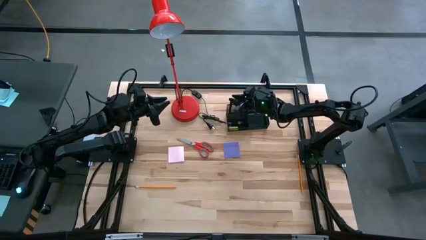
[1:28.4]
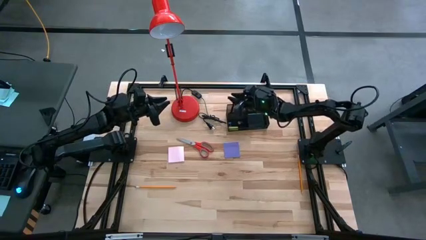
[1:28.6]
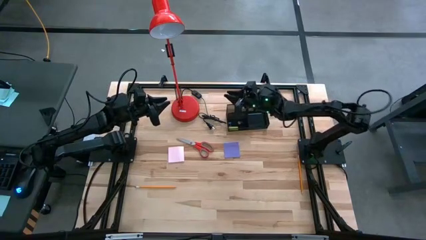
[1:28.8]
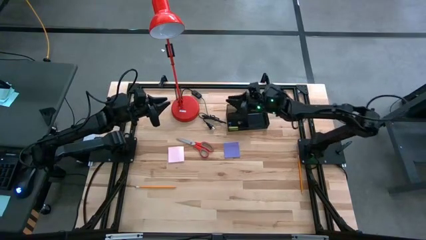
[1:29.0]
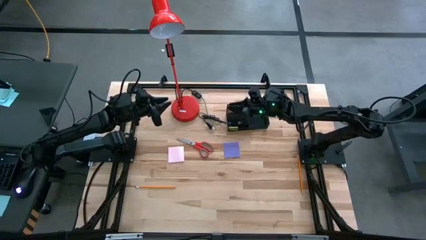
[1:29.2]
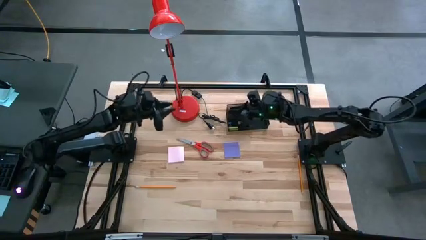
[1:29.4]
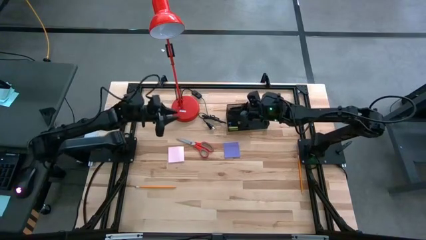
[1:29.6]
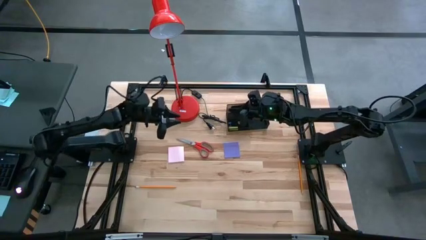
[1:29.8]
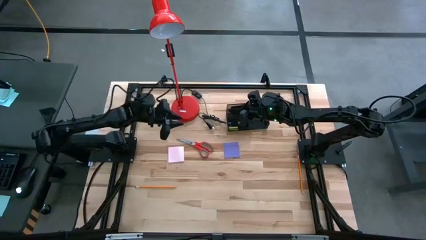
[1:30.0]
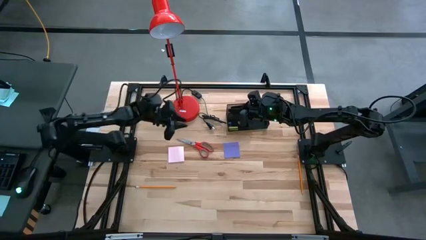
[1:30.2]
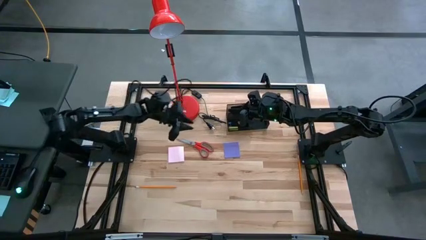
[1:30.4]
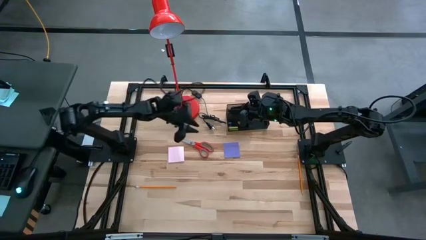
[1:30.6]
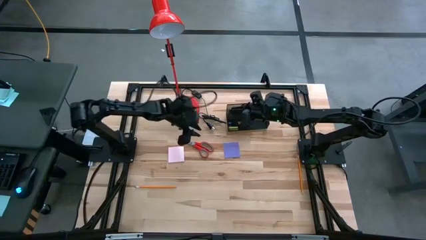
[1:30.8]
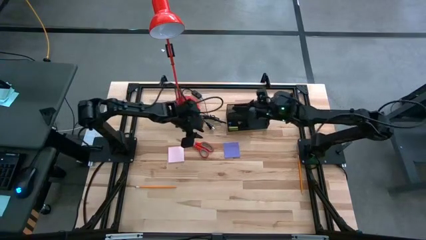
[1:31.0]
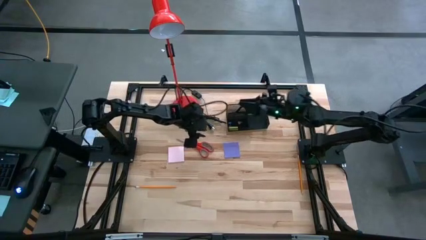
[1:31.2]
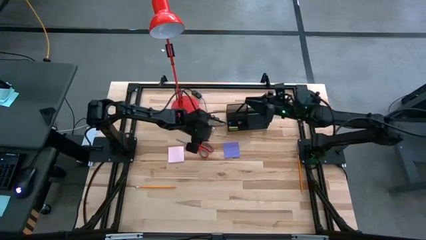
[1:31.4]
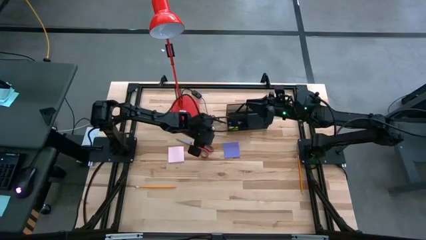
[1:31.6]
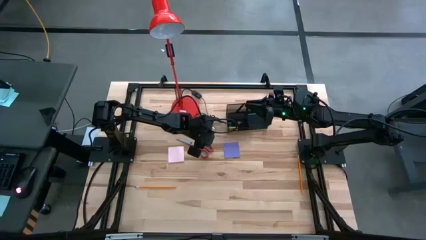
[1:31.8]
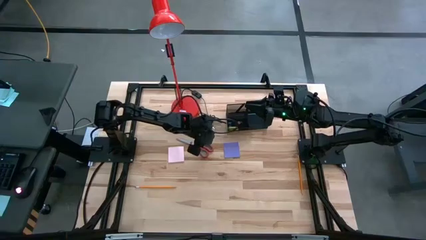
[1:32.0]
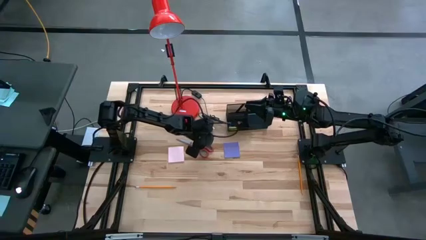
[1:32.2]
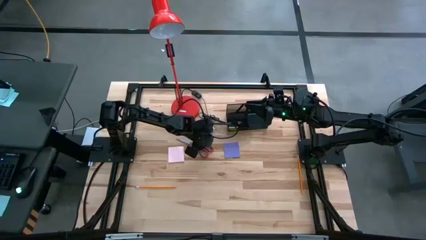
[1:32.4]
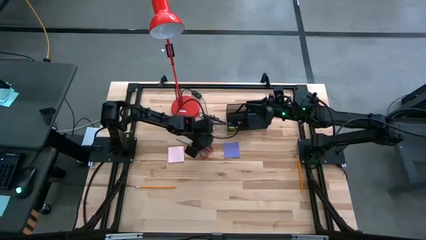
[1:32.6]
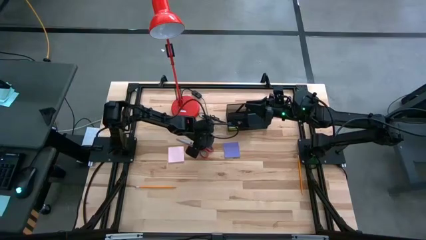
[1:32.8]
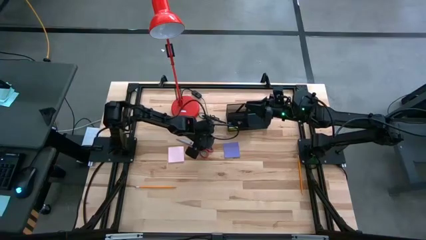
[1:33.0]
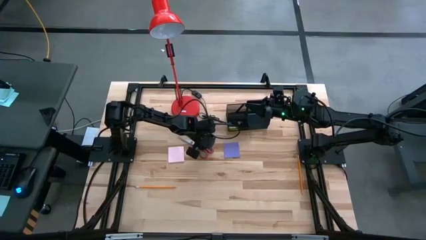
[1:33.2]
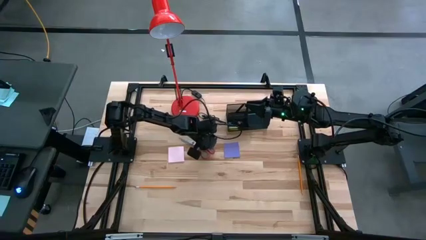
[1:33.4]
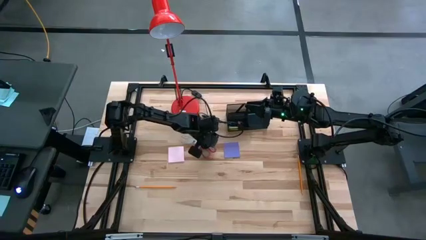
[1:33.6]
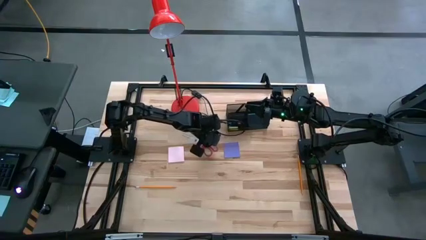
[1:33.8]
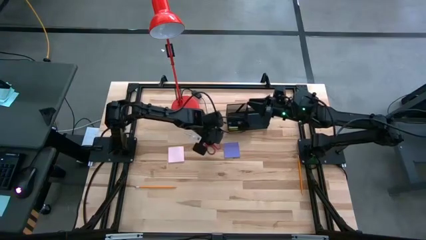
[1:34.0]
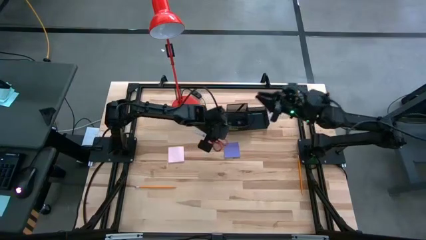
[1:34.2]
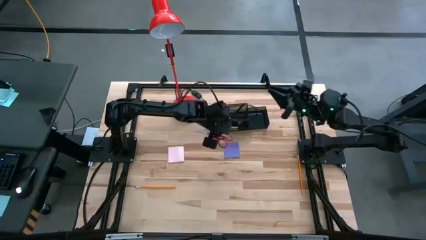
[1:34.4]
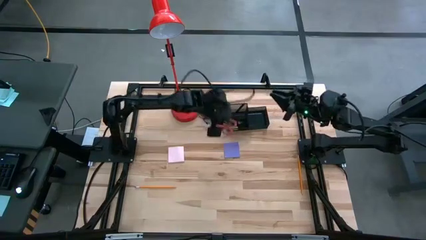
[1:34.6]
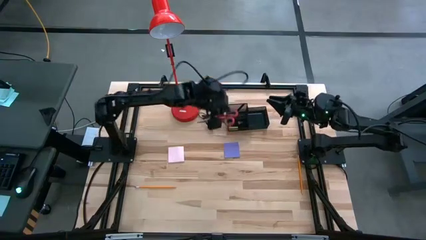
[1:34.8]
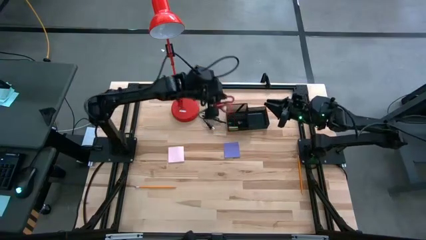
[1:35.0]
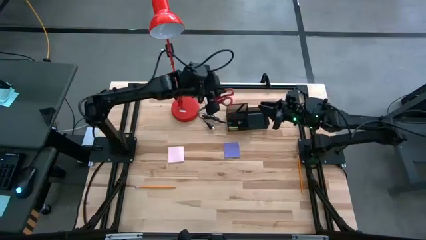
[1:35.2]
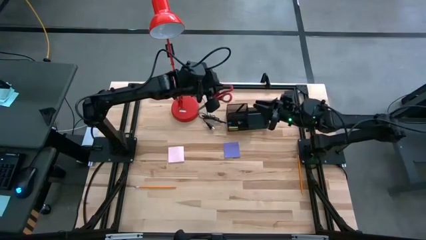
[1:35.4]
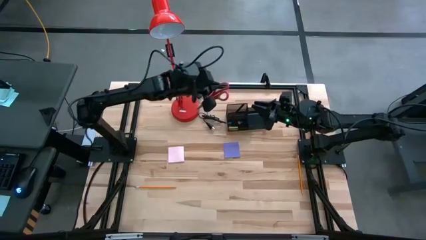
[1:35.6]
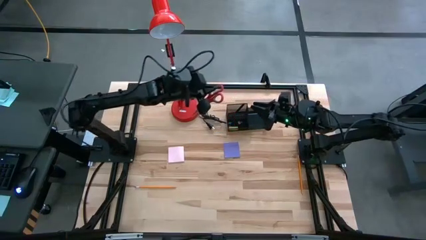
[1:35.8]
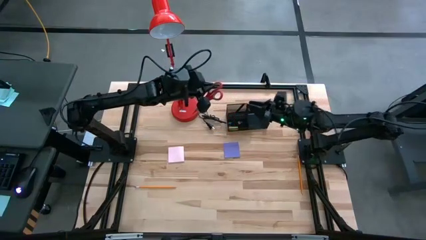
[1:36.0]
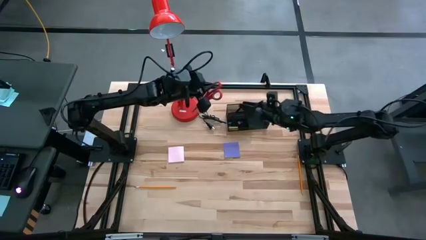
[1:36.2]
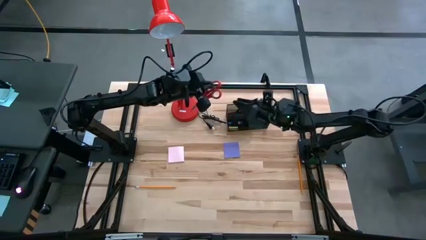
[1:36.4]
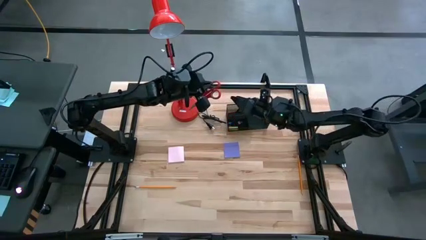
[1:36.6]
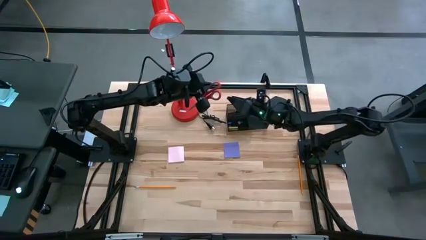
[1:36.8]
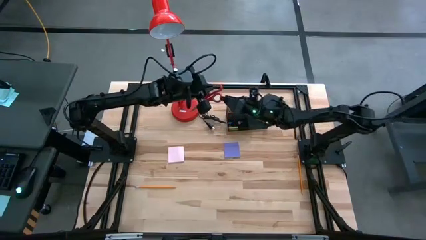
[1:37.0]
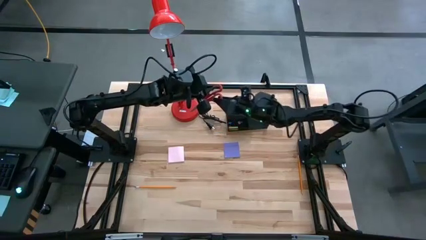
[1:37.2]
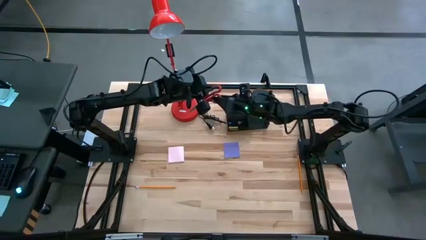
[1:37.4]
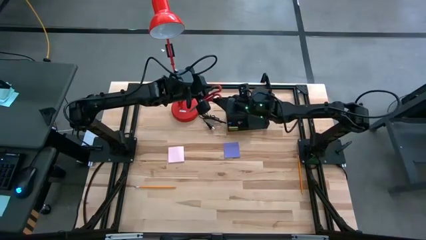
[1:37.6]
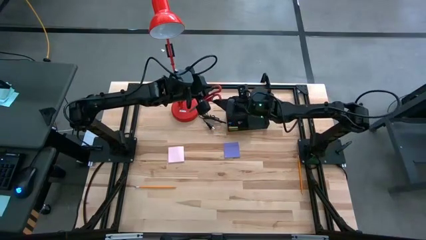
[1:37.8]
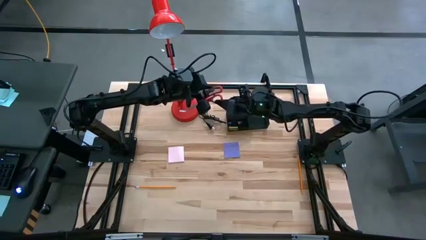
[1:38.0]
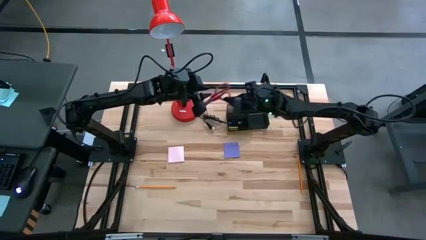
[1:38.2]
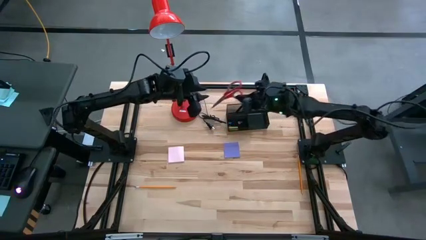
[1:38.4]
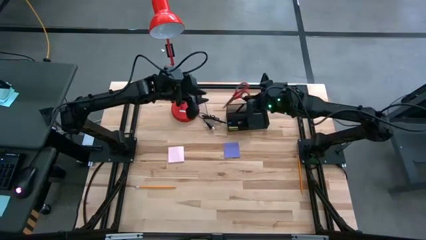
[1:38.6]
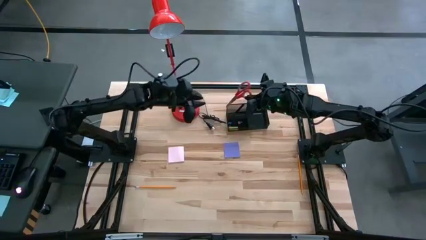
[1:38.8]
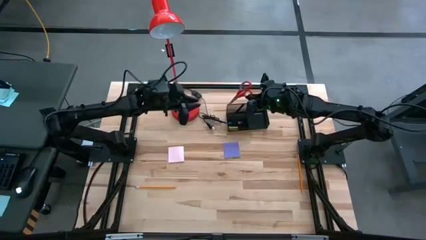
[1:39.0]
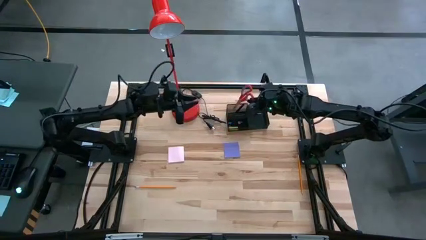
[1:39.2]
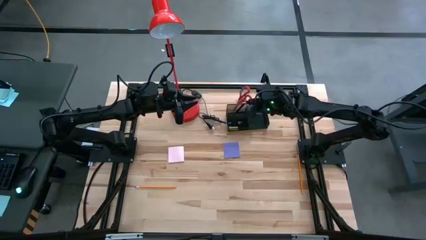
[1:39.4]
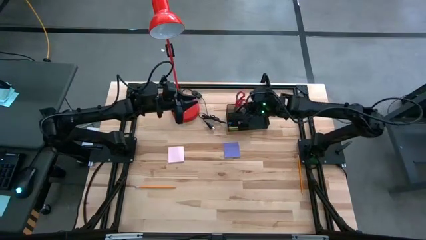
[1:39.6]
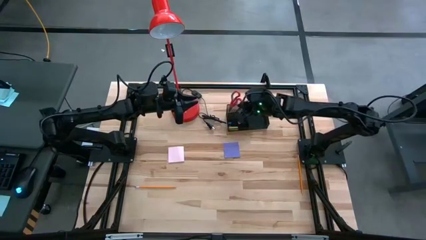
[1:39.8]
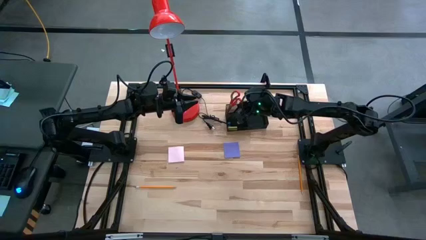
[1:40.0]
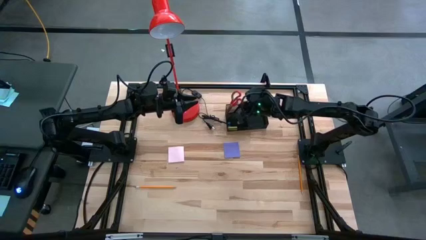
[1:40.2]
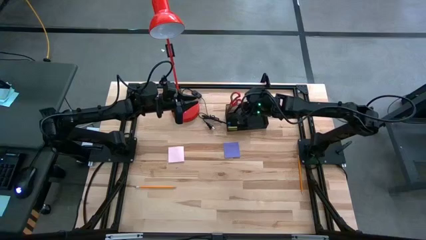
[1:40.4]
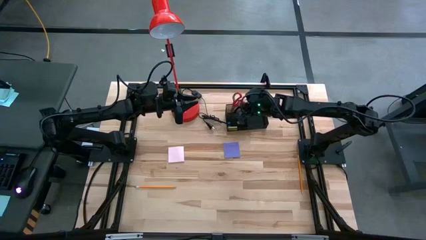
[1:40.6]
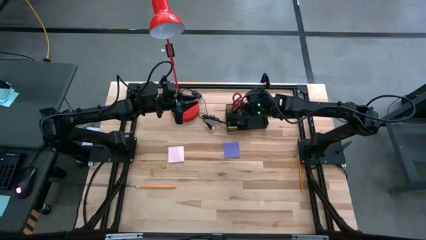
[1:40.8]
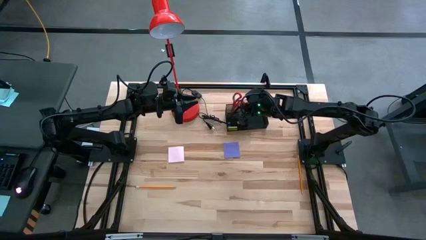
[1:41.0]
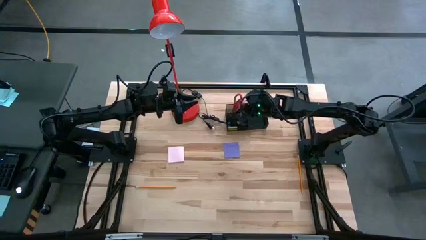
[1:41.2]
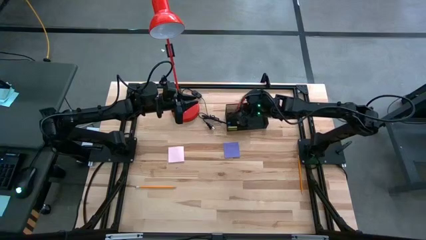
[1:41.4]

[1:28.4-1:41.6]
Task: Pick and place office supplies into organizer
Put the red scissors into the black desk organizer
